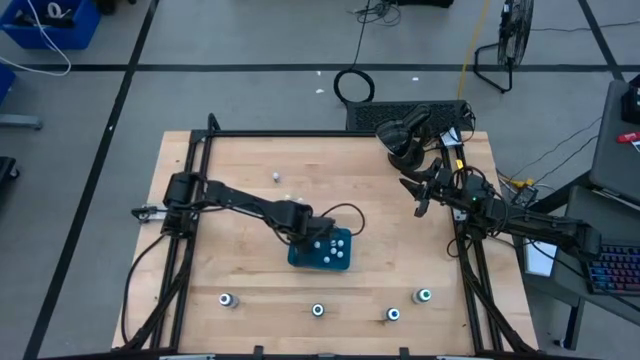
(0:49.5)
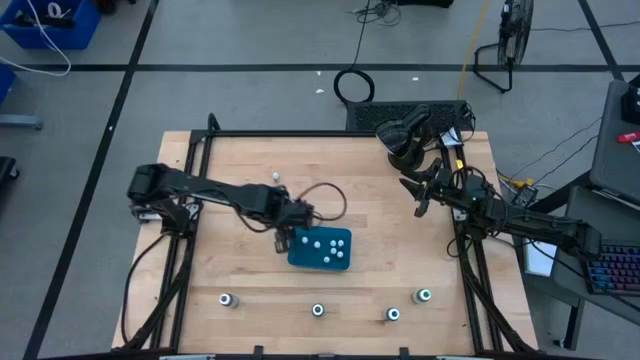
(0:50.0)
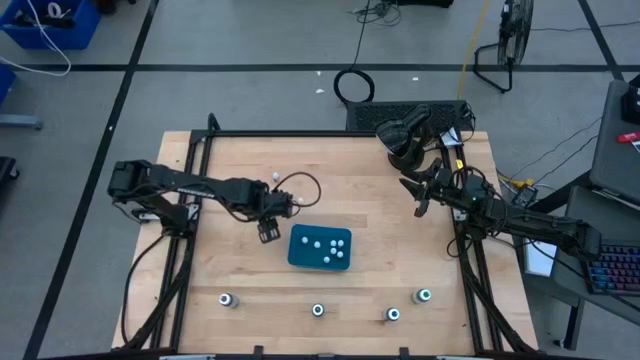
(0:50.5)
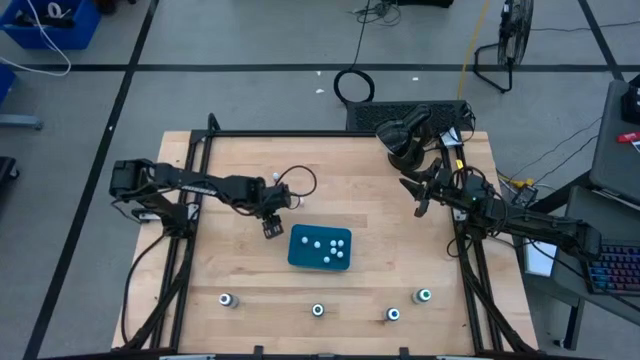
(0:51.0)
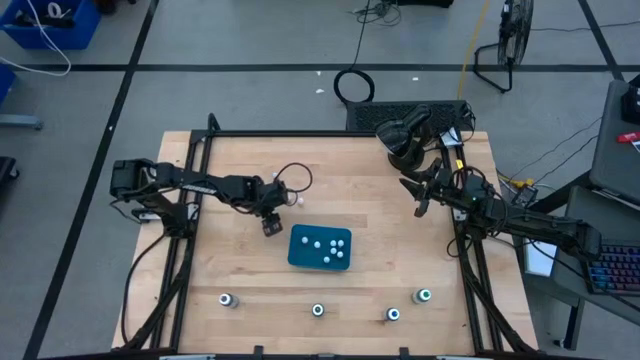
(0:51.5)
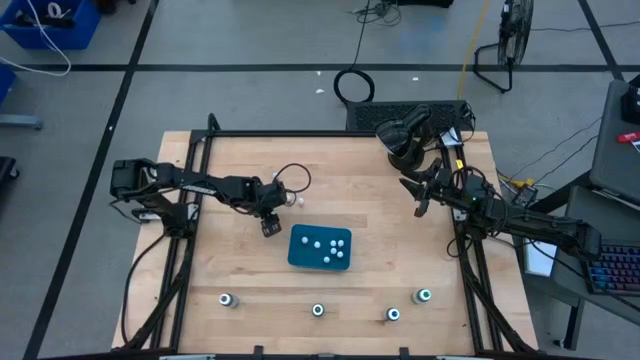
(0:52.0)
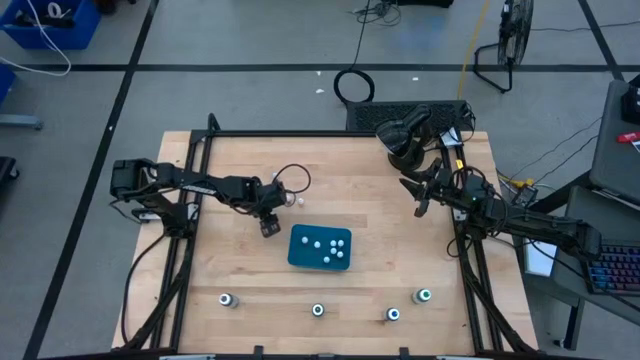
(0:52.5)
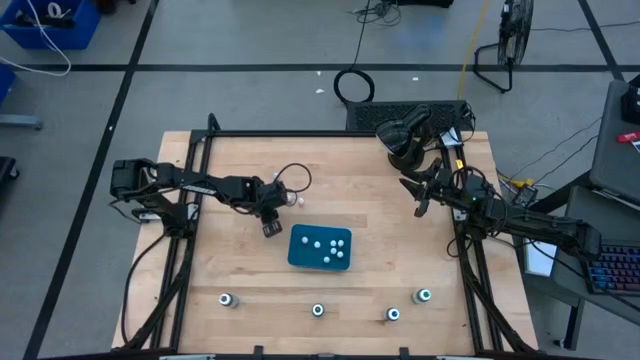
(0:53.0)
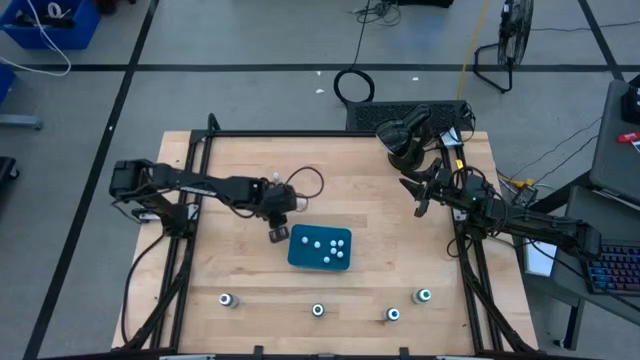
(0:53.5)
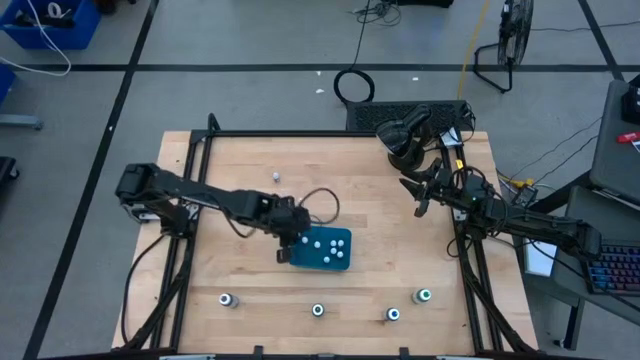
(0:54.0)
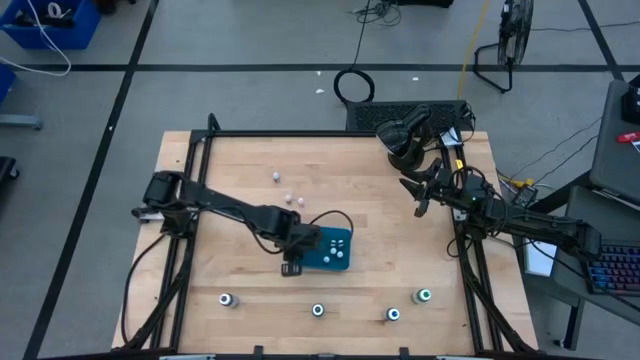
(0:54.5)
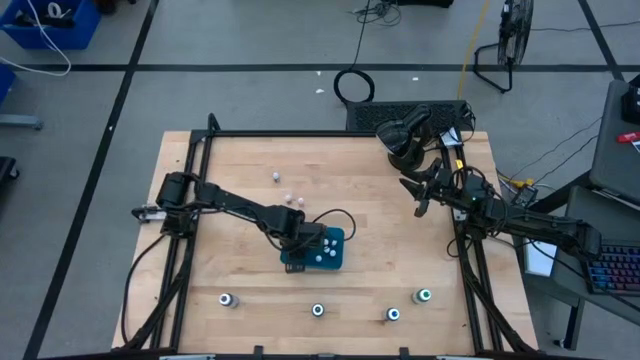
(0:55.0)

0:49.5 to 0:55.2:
Task: Pick & Place food coloring
Put the blue food coloring bottle into the blue bin

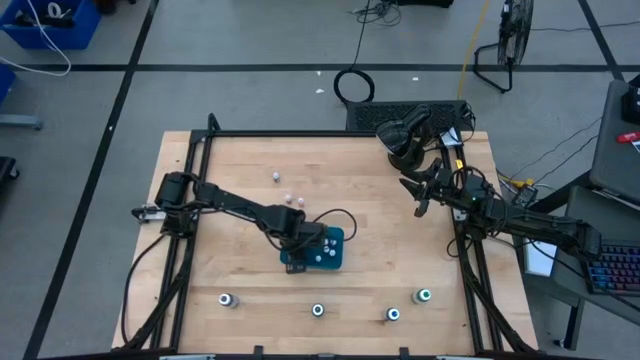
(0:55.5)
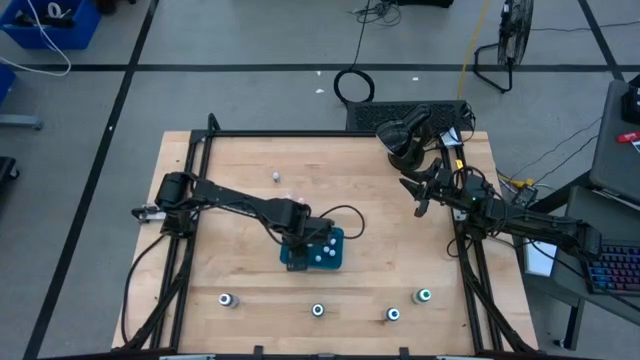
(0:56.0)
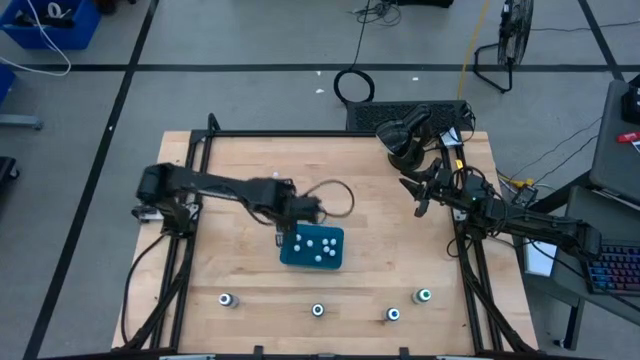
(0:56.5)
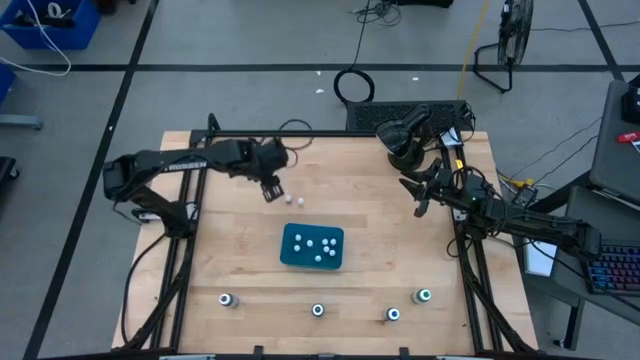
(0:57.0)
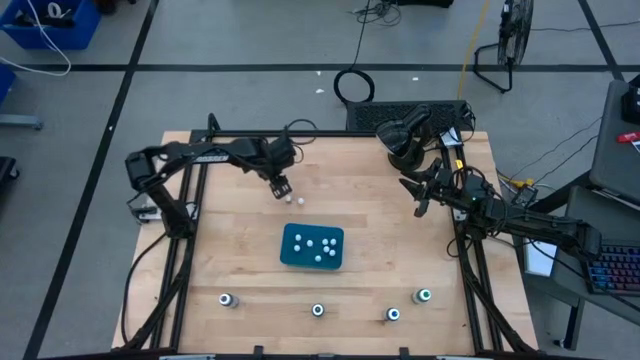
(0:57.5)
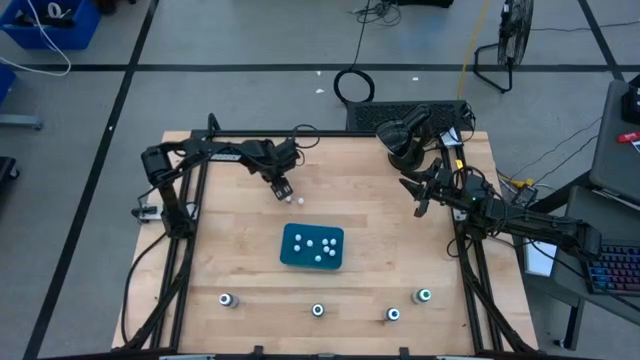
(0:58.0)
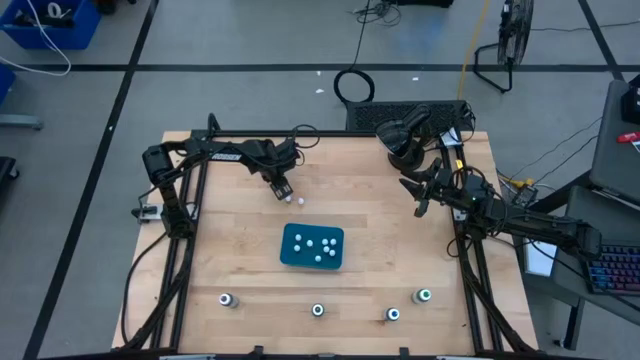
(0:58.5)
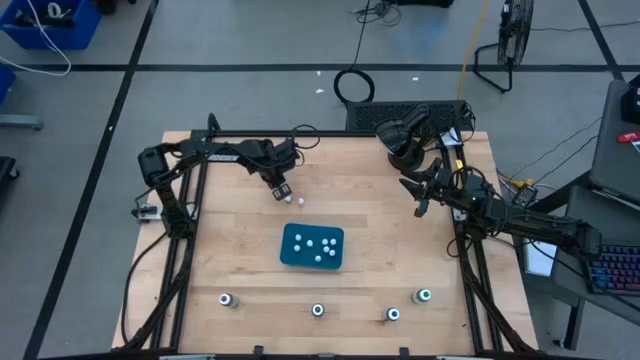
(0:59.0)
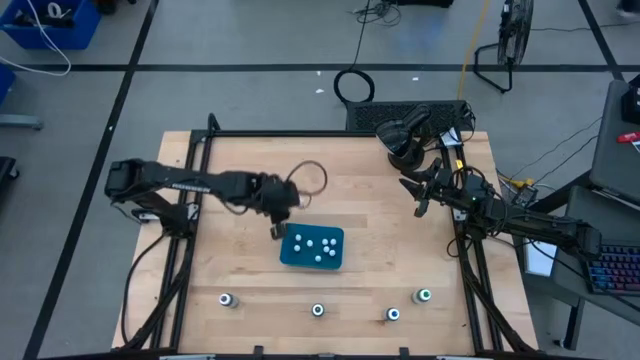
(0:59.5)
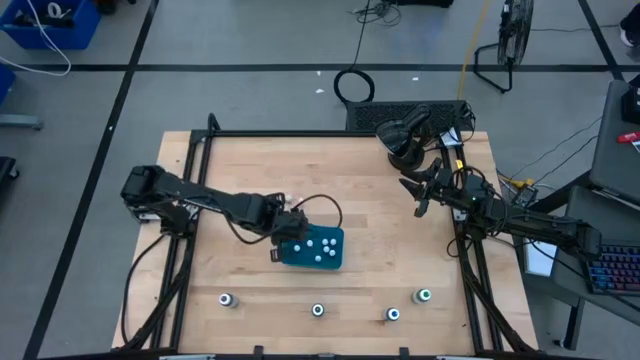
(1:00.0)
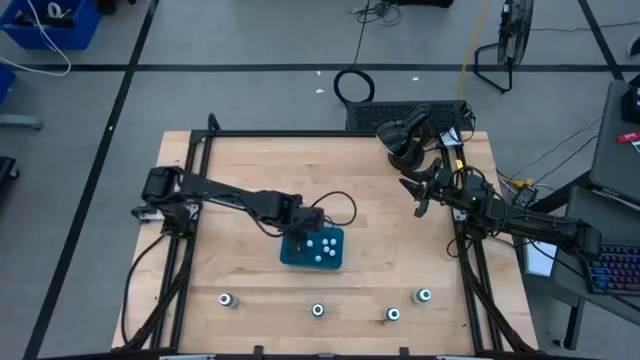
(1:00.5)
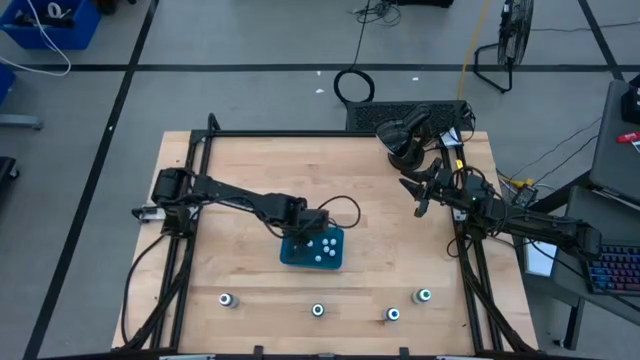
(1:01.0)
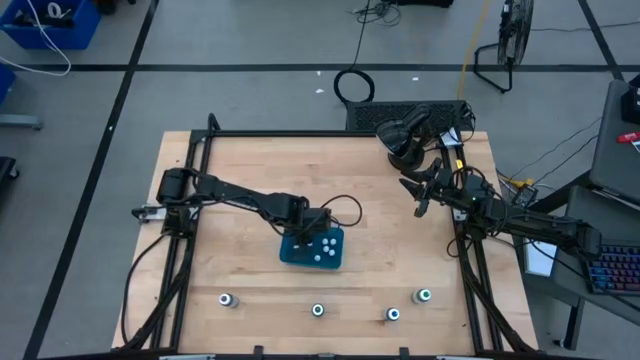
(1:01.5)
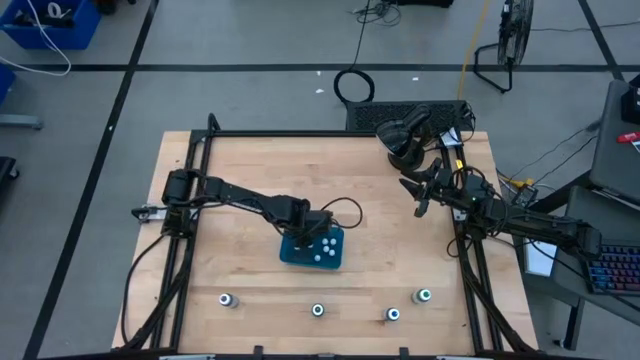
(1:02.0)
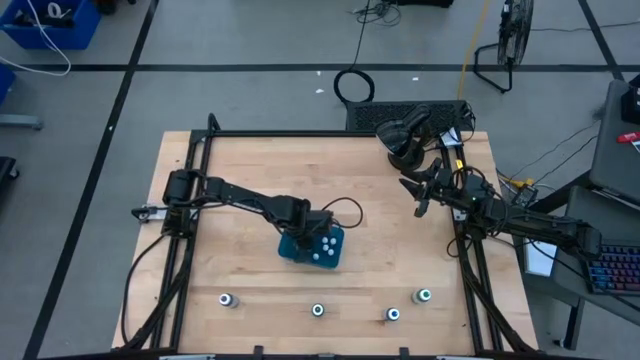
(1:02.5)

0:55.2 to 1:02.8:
Put the purple food coloring bottle into the blue bin

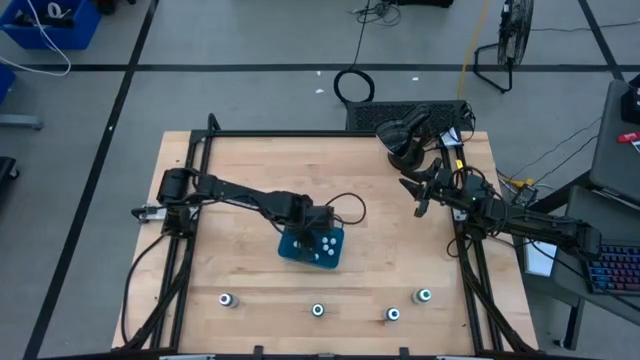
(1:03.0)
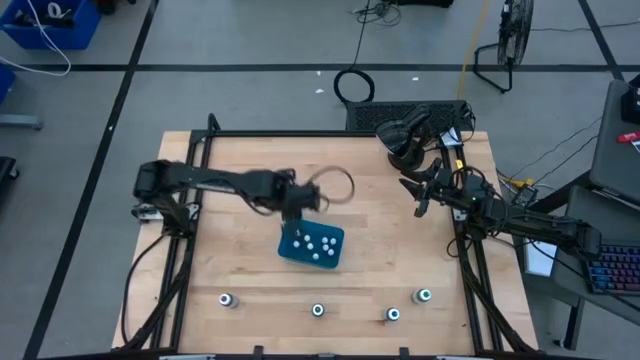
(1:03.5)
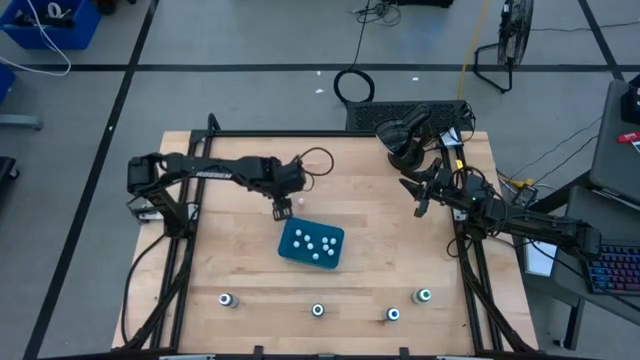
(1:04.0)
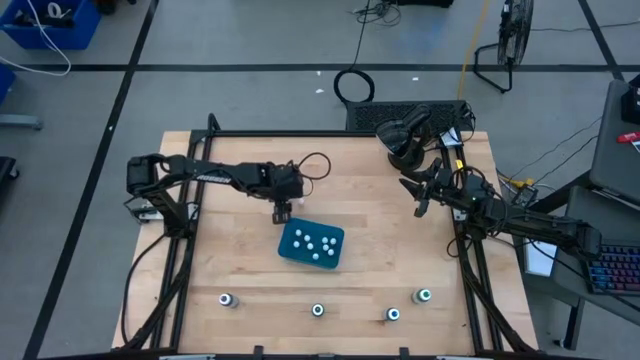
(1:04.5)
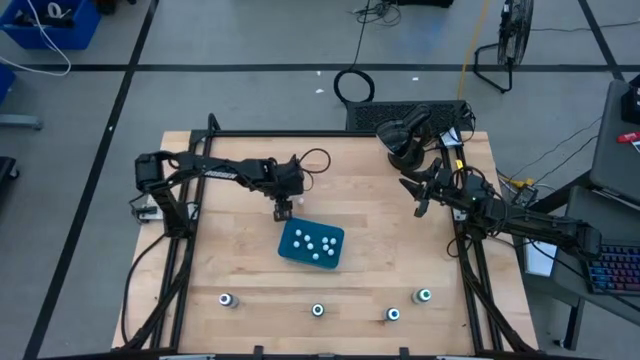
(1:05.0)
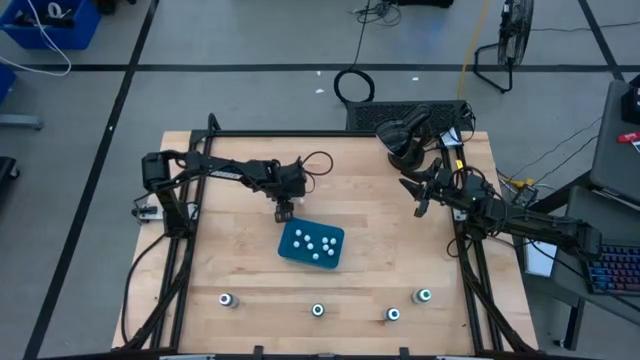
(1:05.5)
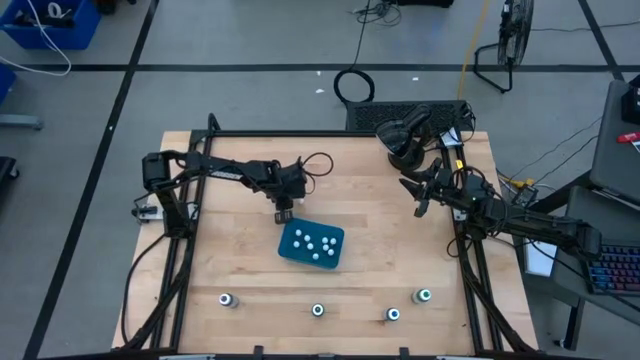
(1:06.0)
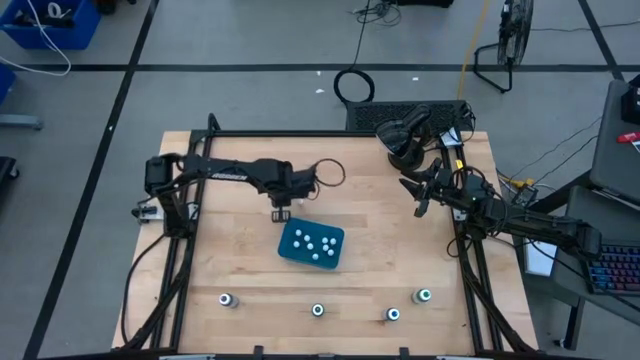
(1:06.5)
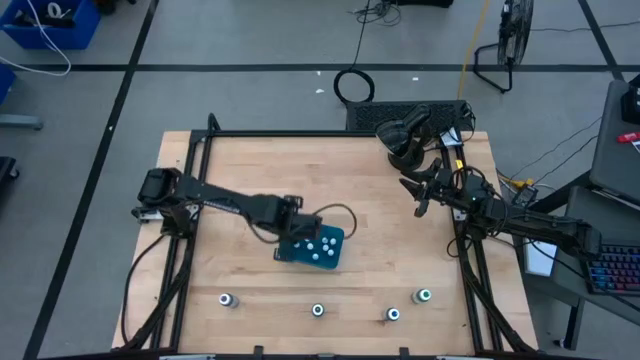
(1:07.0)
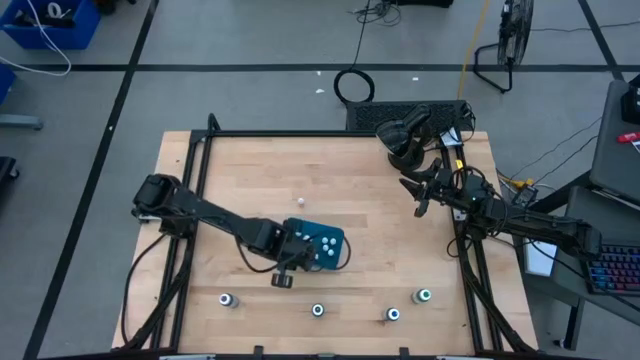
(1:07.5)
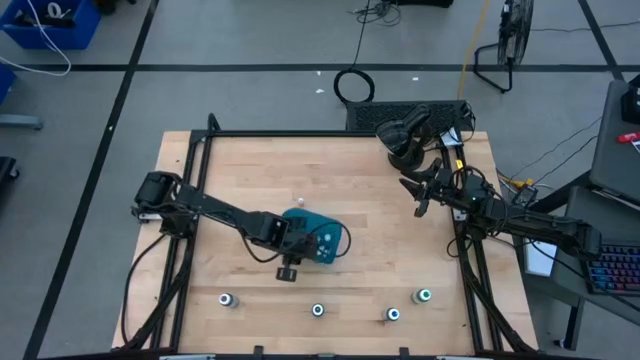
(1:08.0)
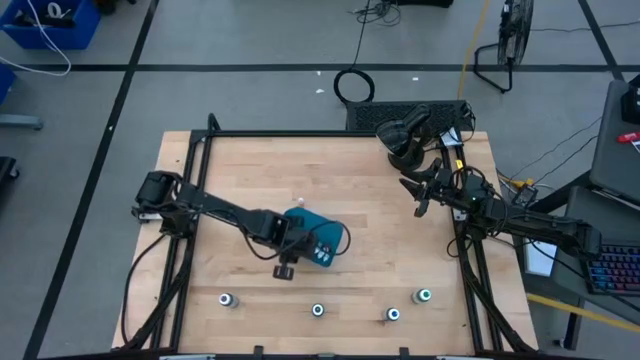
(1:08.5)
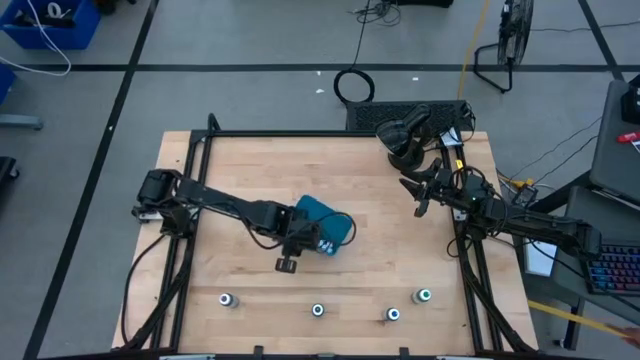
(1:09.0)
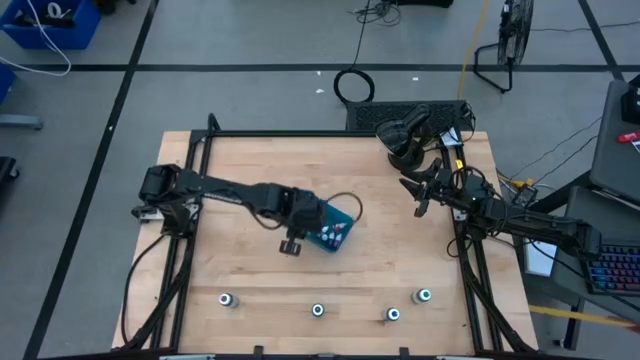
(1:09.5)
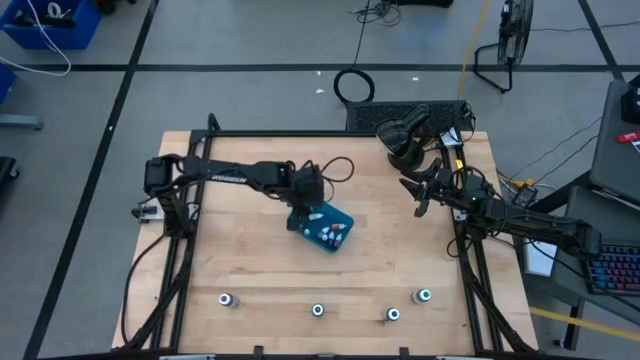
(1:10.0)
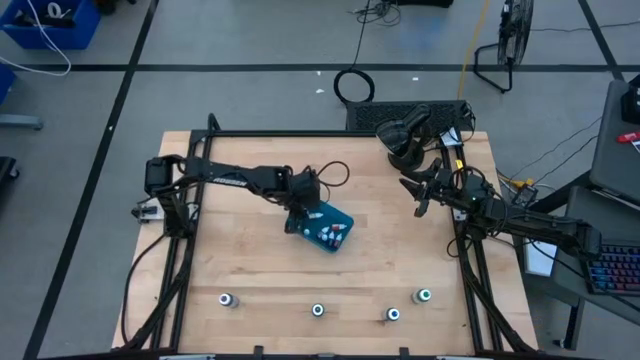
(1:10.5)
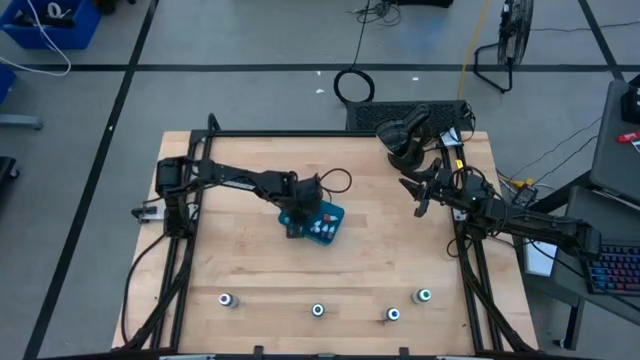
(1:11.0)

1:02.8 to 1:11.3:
Put the black food coloring bottle into the blue bin
